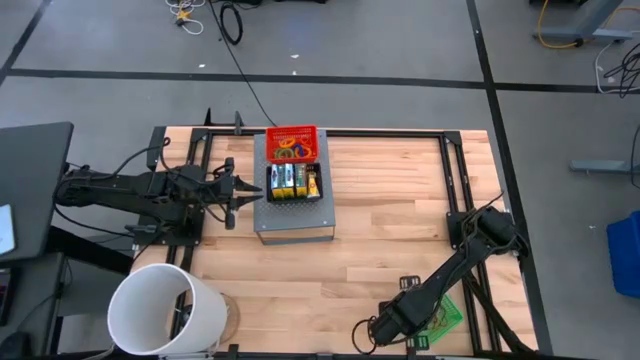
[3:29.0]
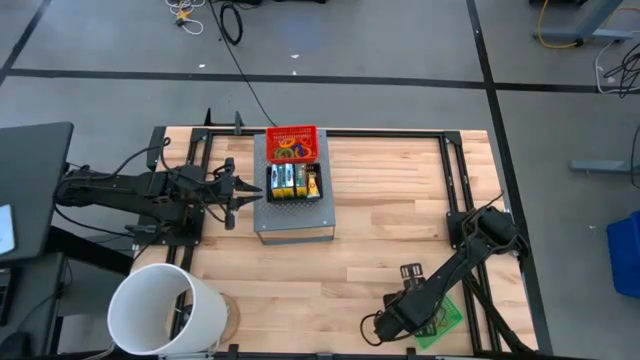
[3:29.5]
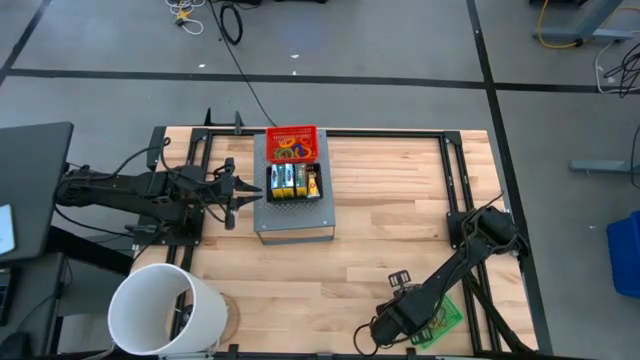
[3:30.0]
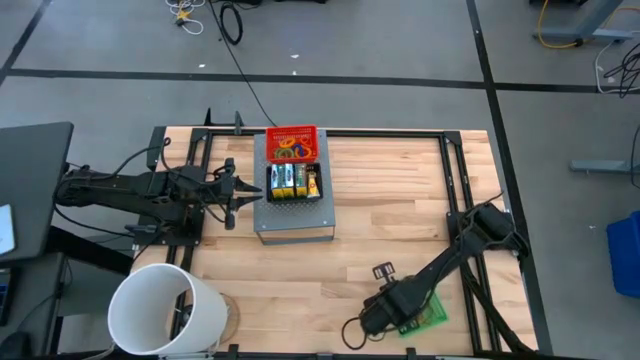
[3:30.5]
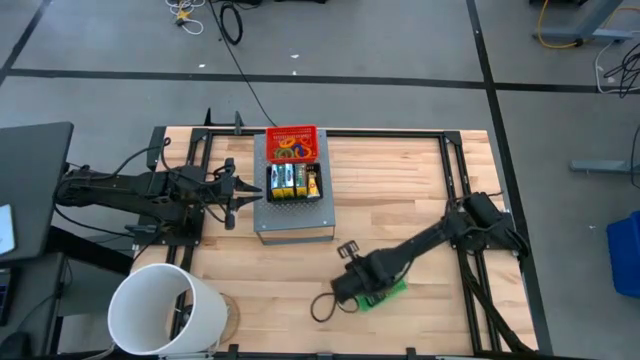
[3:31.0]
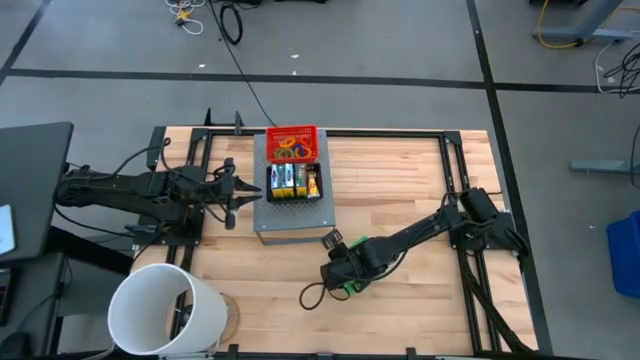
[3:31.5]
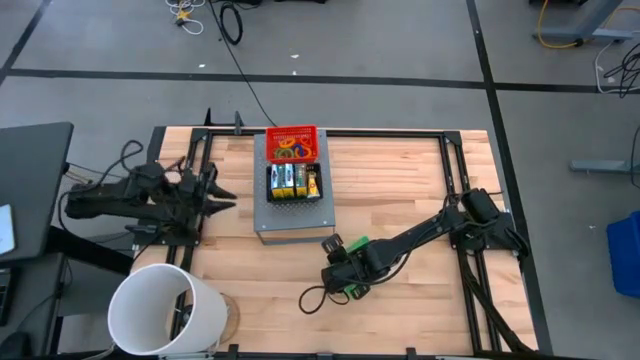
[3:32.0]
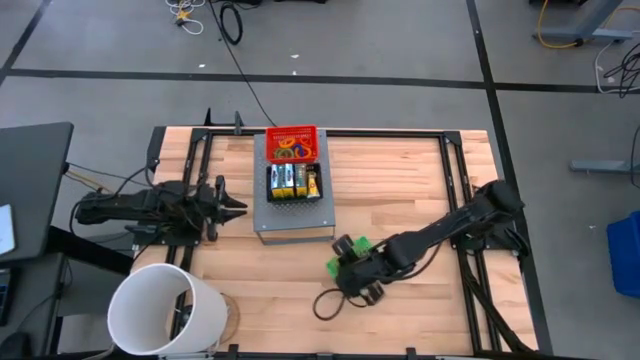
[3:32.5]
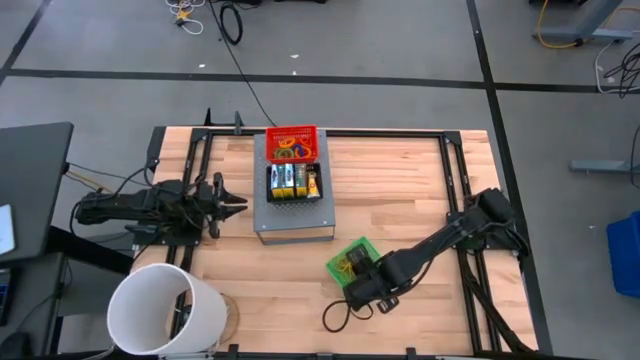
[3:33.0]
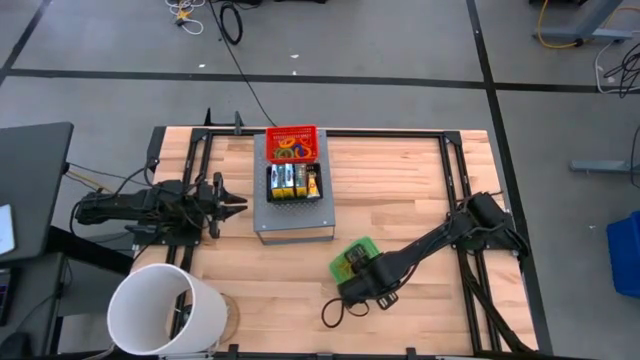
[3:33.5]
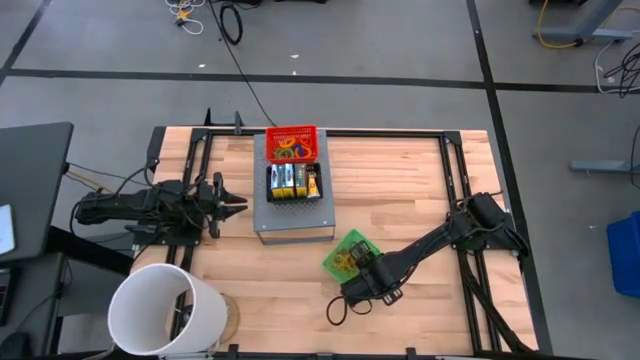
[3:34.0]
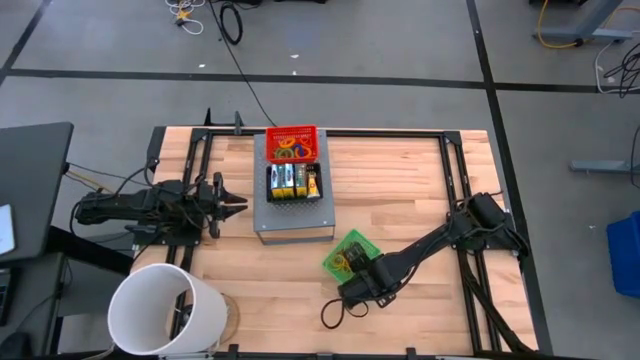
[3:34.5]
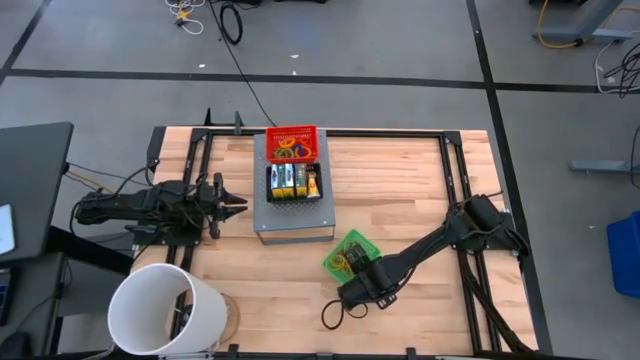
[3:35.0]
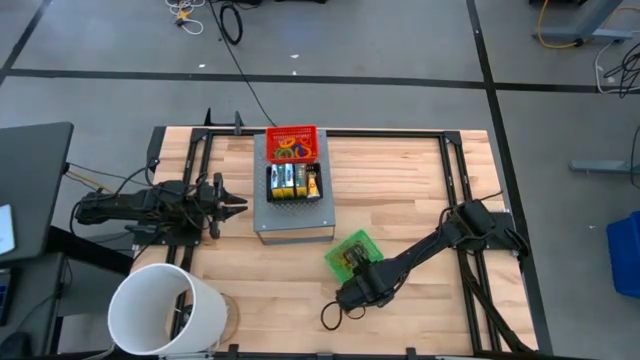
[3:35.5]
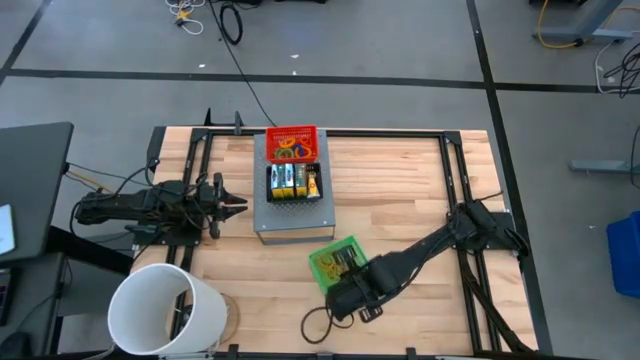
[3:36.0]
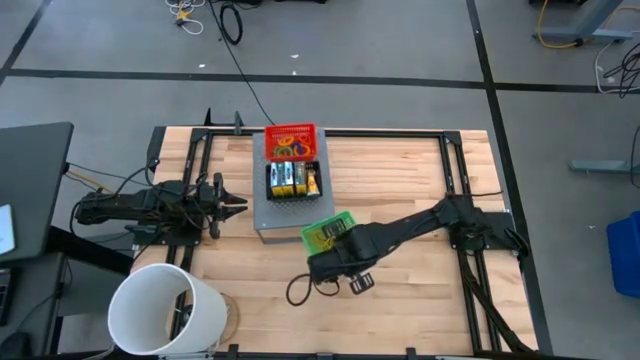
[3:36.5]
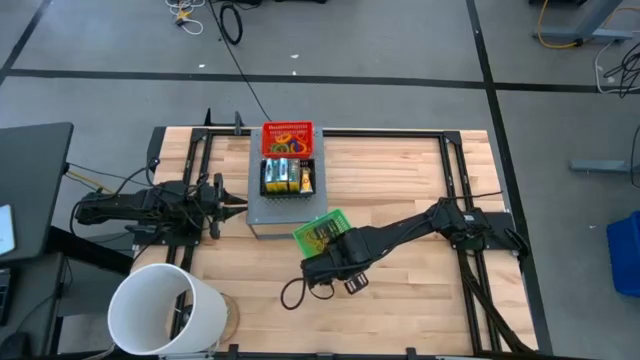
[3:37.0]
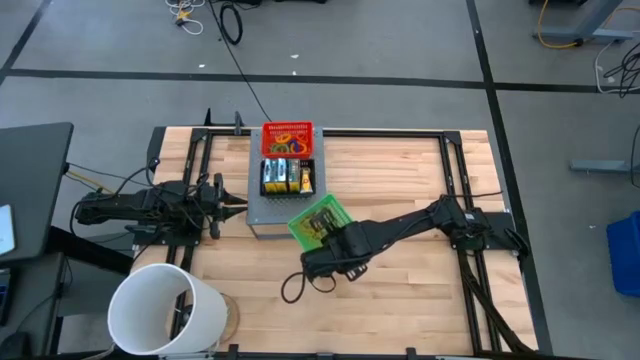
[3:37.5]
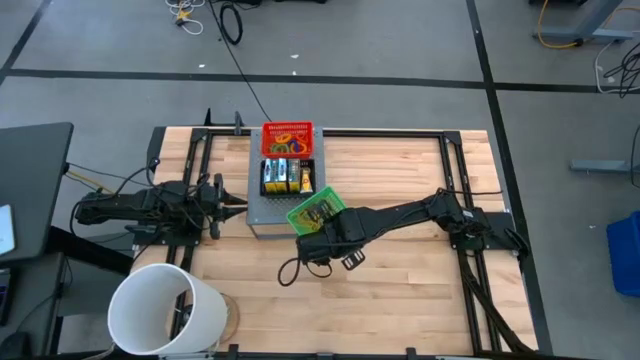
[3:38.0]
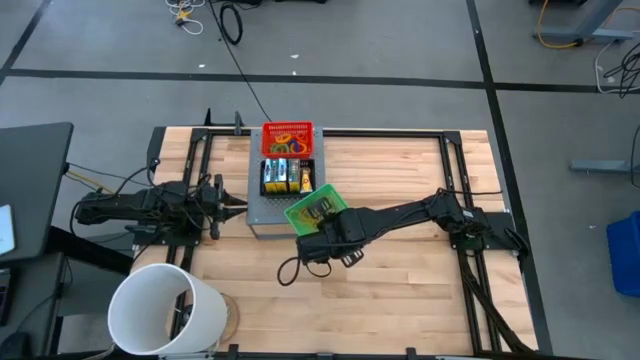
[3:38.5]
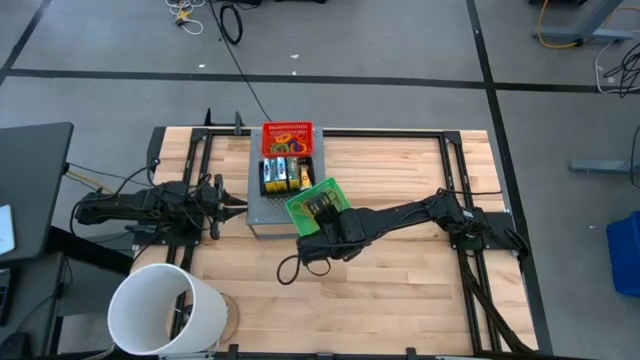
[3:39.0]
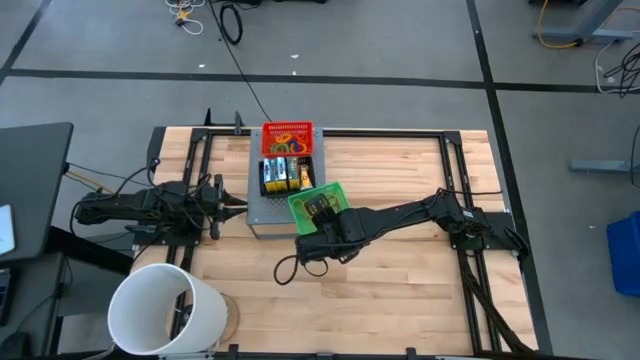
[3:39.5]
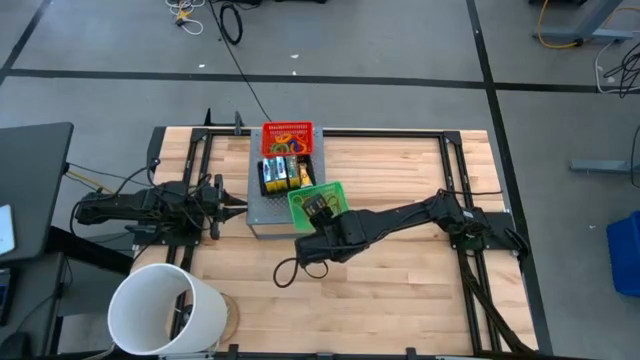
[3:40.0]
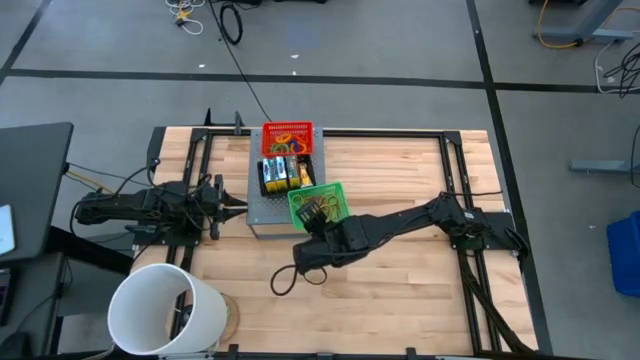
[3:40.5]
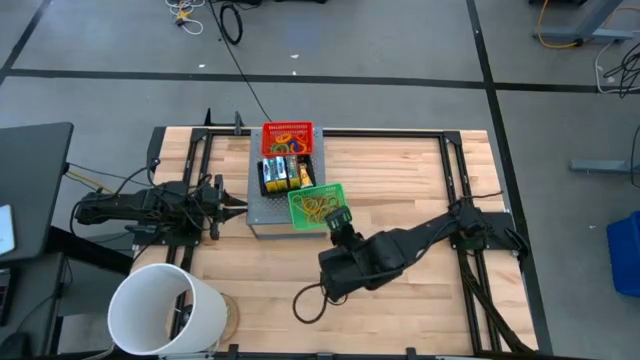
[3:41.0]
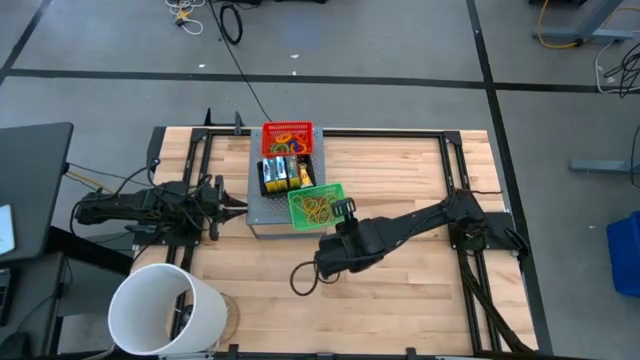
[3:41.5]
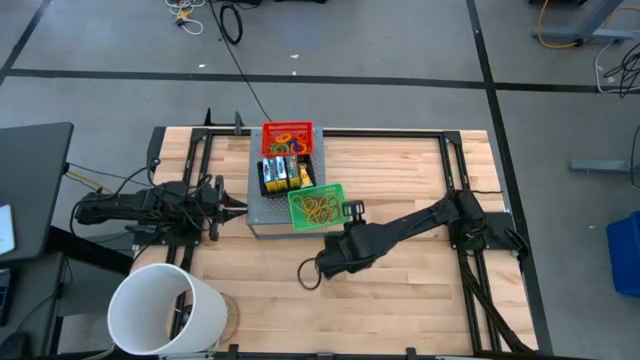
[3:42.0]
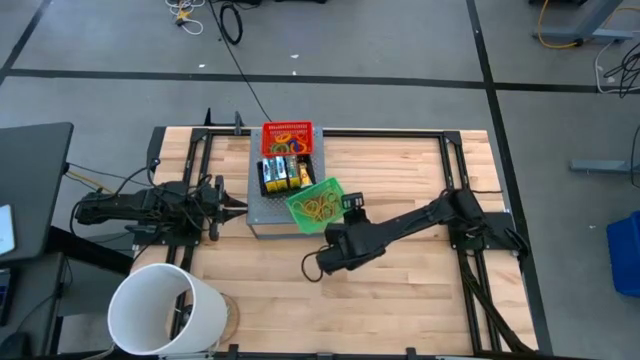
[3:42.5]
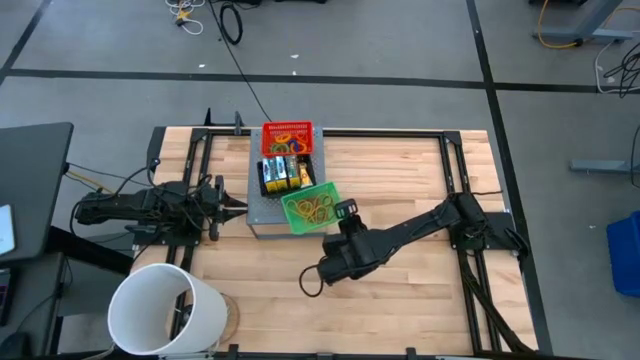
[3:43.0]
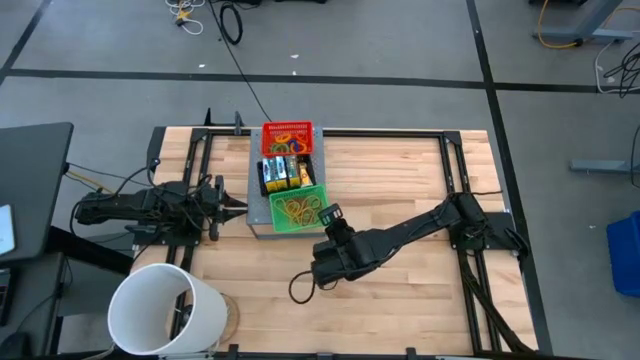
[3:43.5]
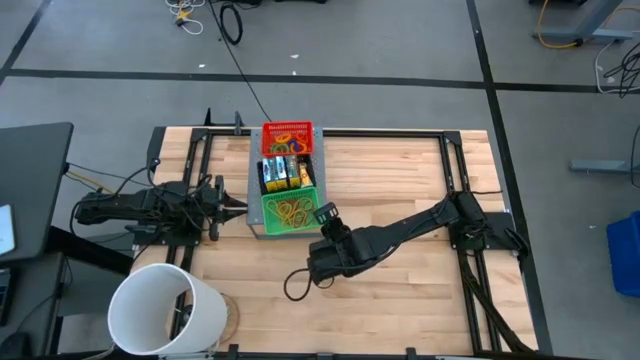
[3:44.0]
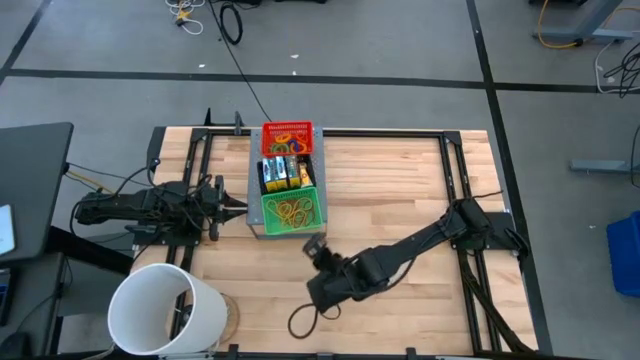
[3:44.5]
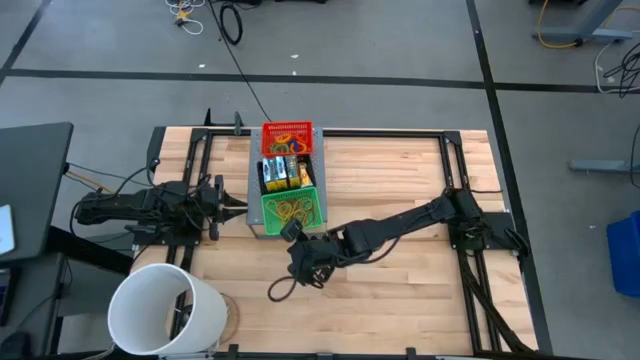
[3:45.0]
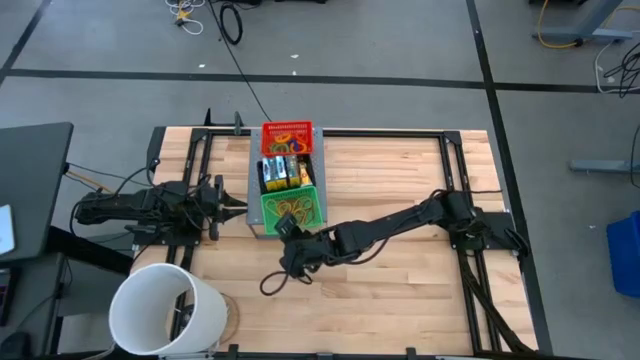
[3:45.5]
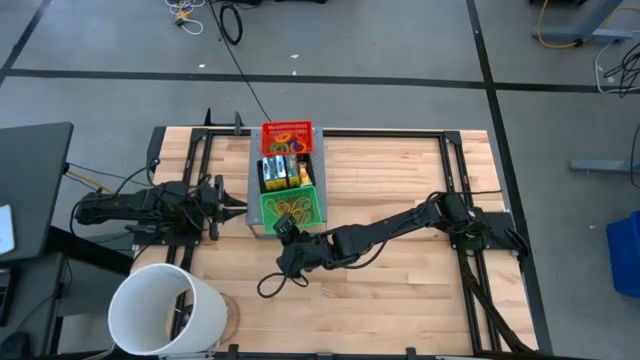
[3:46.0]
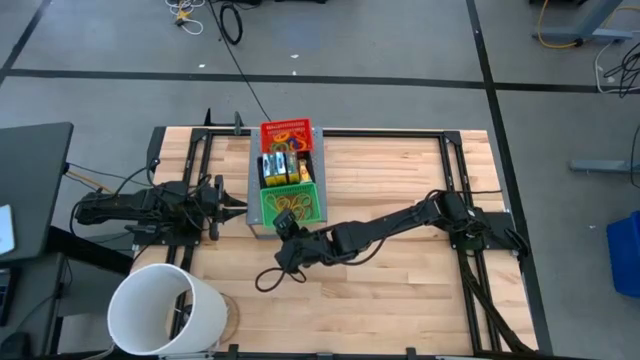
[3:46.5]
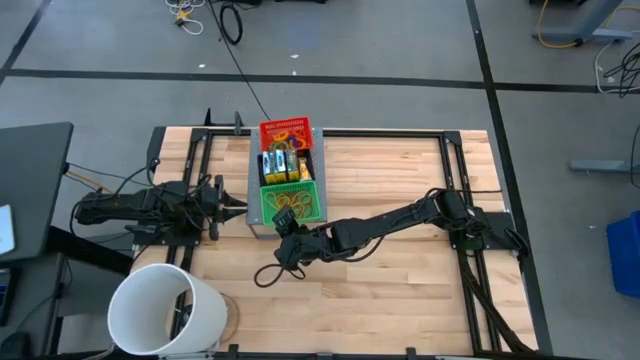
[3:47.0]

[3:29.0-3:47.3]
Task: Pick & Place Office Desk Supplies
Put the green basket with the rubber bands on the shelf

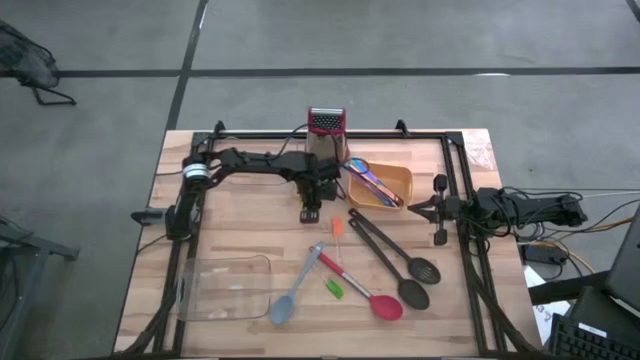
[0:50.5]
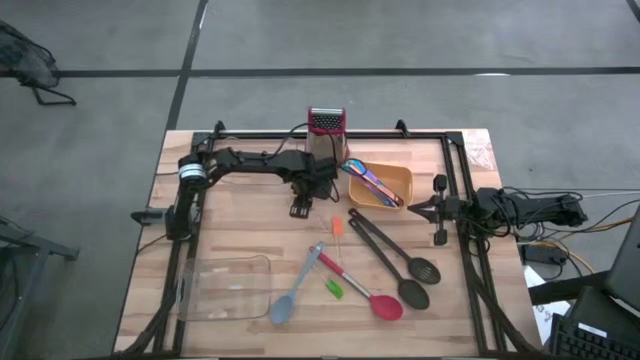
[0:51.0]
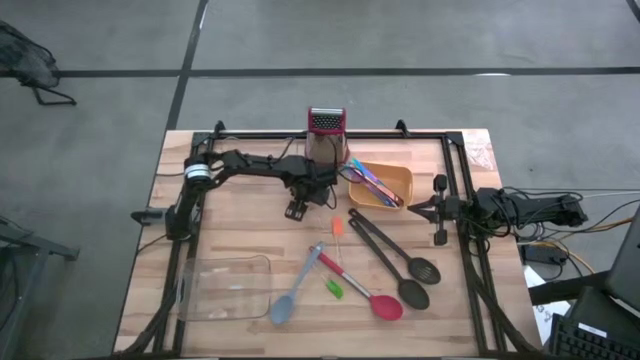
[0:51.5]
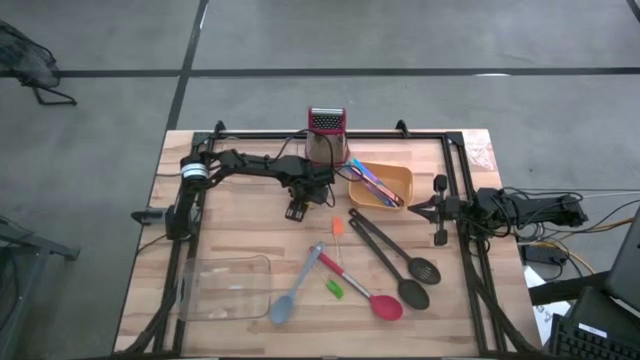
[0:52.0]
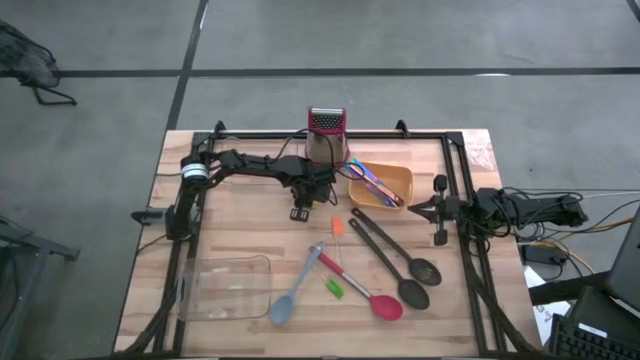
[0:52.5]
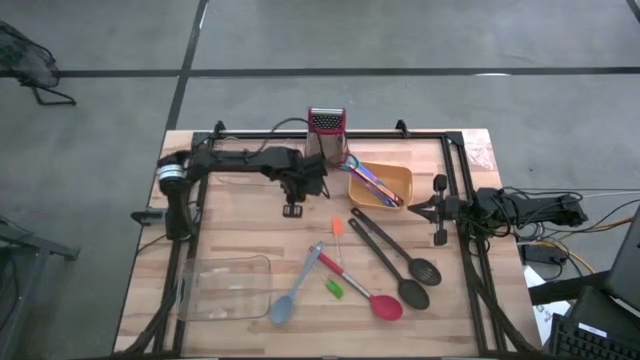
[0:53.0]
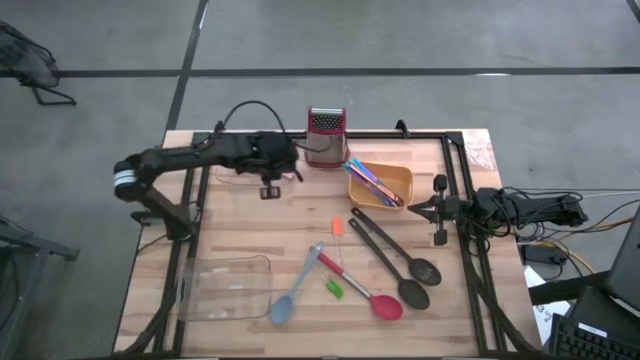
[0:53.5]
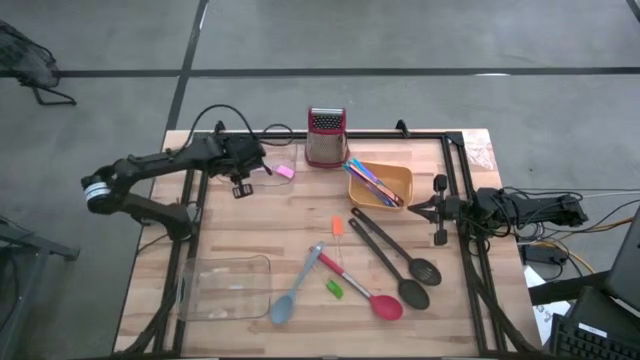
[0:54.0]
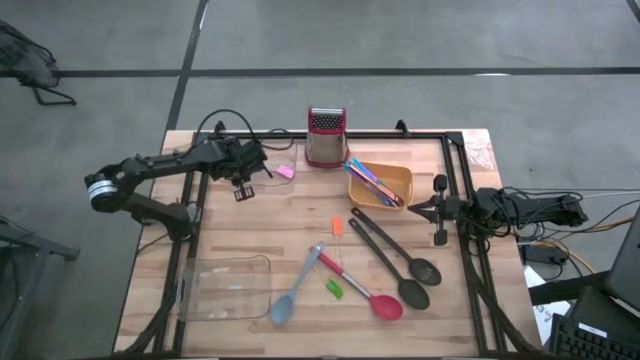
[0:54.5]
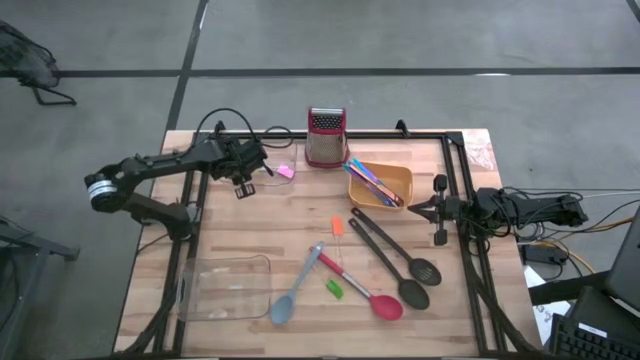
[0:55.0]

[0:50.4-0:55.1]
Task: Pick & Place Kitchen Items
Put the yellow spatula into the top transparent bin
